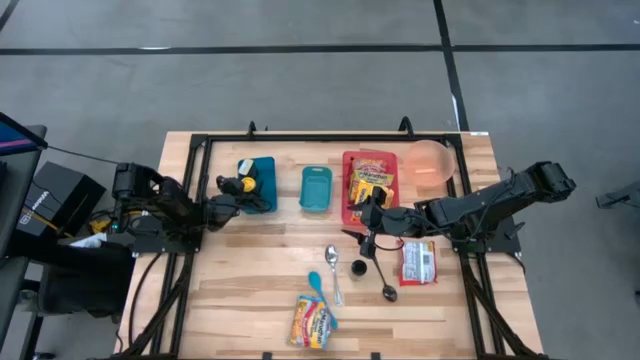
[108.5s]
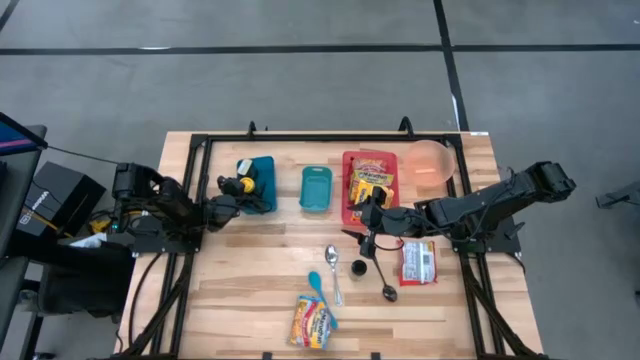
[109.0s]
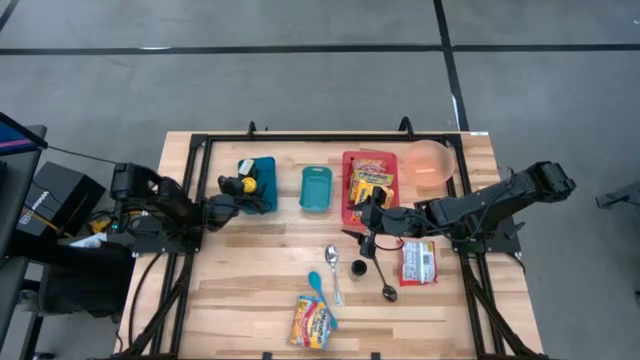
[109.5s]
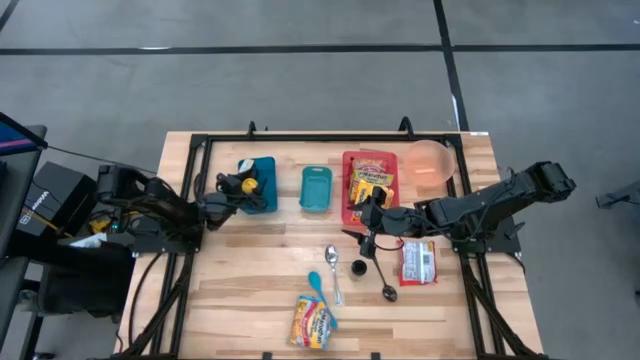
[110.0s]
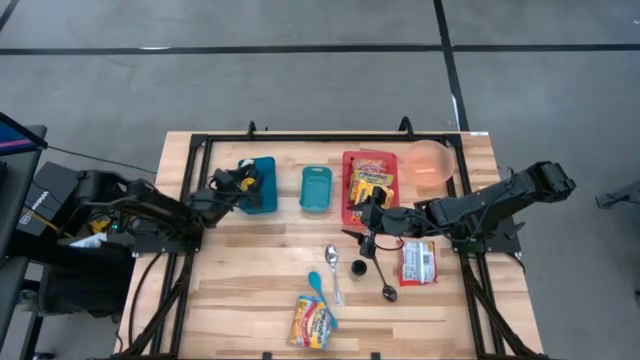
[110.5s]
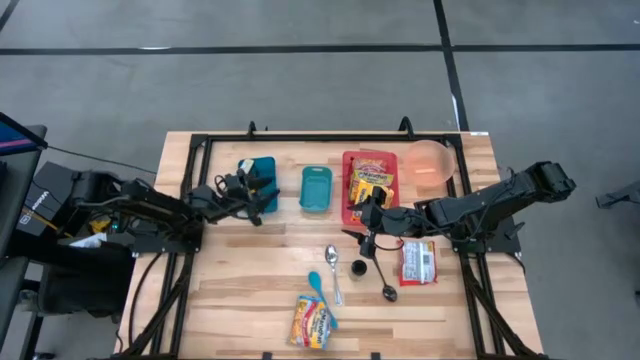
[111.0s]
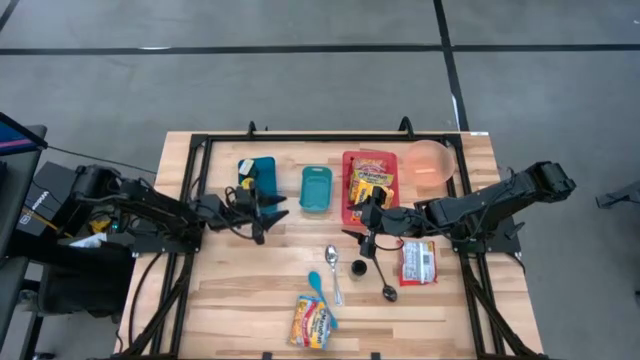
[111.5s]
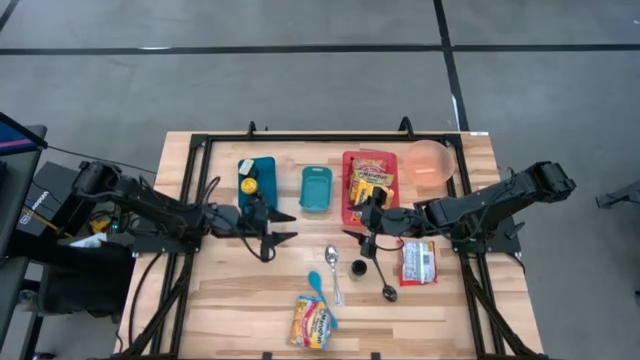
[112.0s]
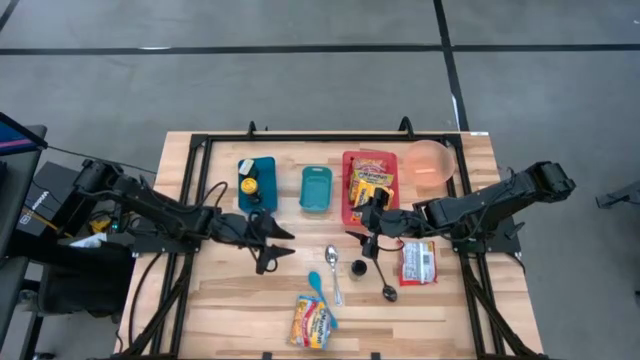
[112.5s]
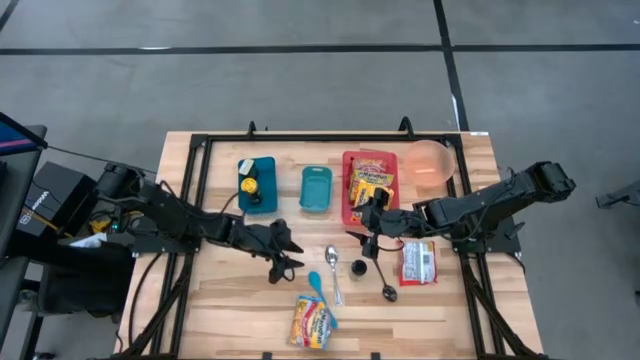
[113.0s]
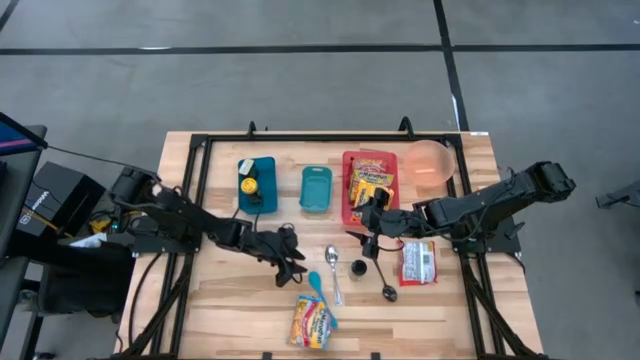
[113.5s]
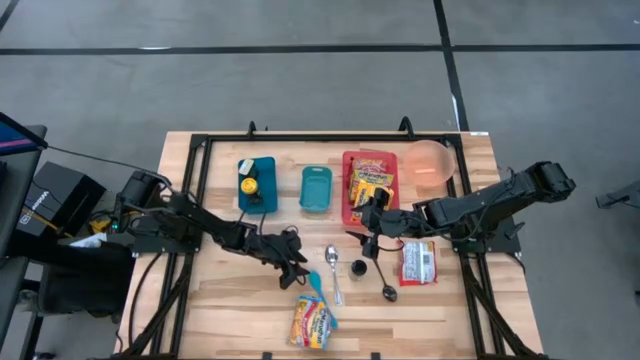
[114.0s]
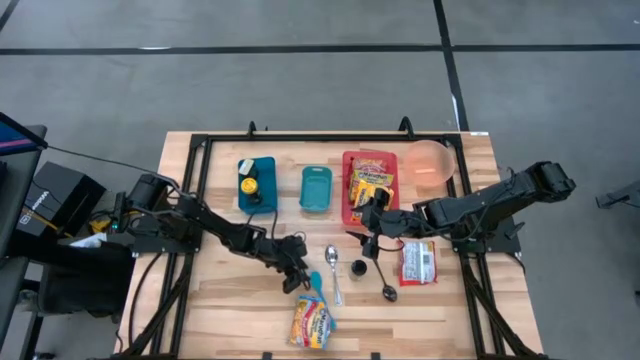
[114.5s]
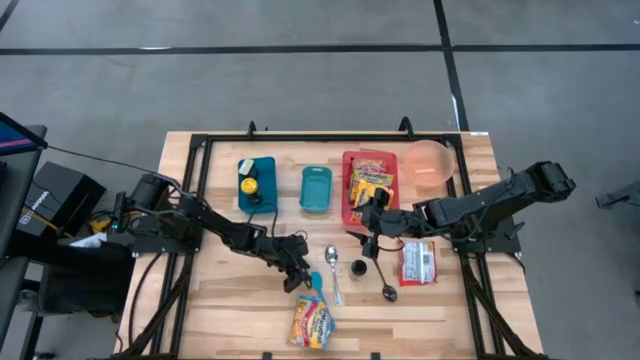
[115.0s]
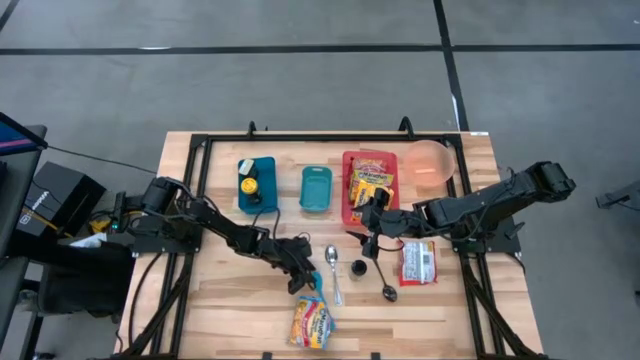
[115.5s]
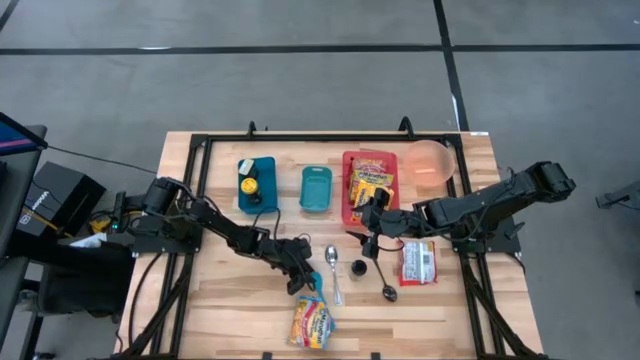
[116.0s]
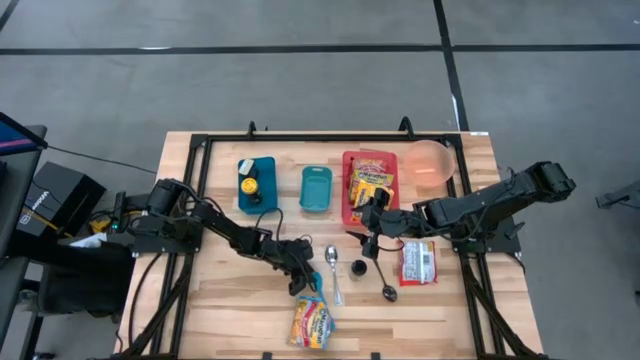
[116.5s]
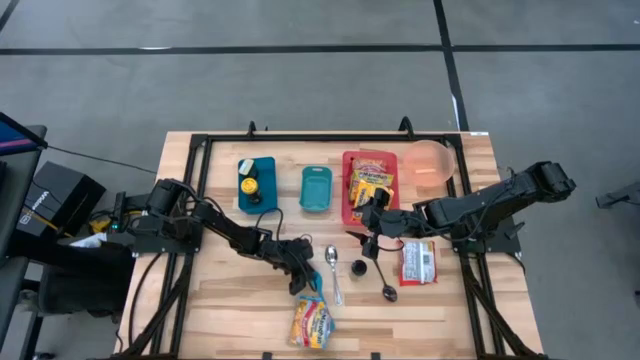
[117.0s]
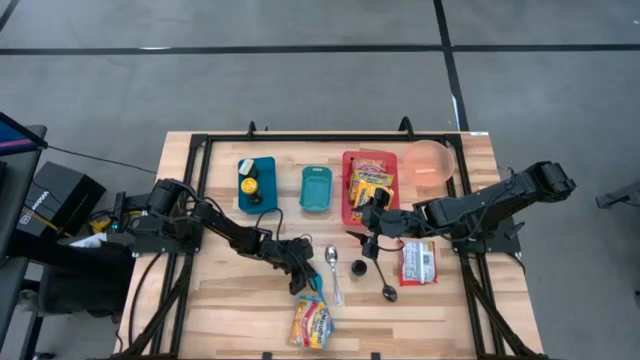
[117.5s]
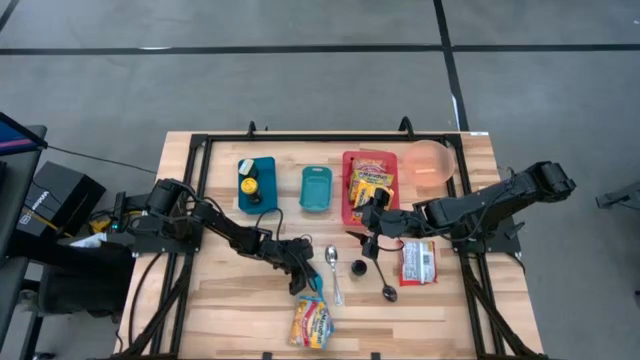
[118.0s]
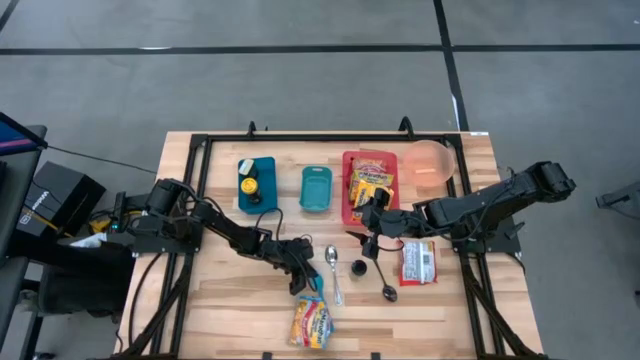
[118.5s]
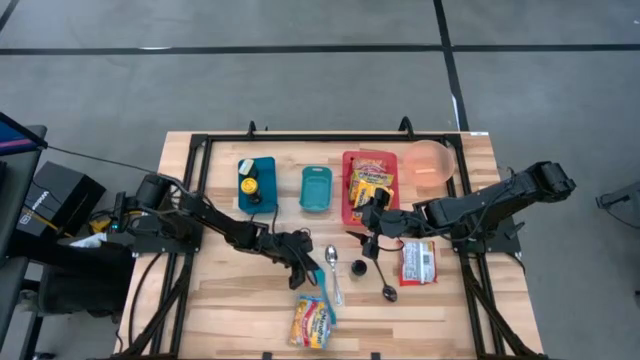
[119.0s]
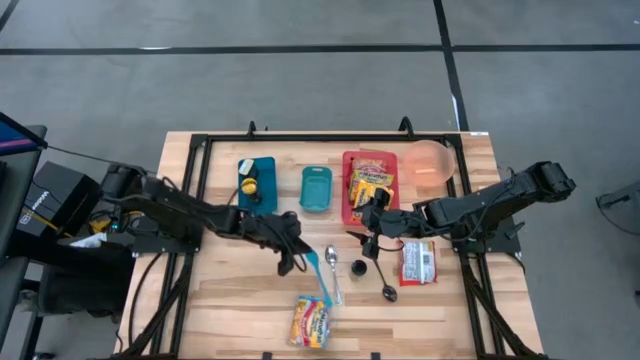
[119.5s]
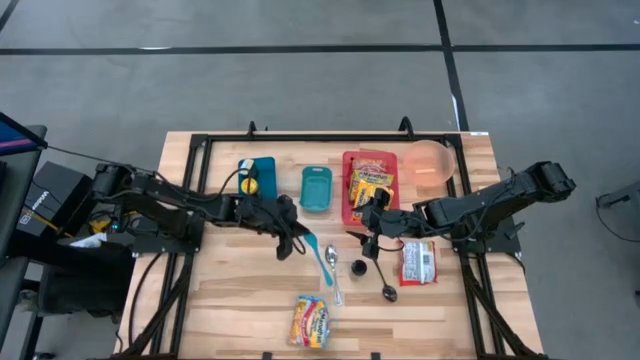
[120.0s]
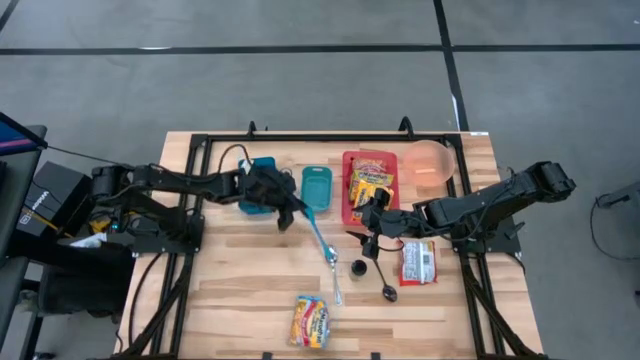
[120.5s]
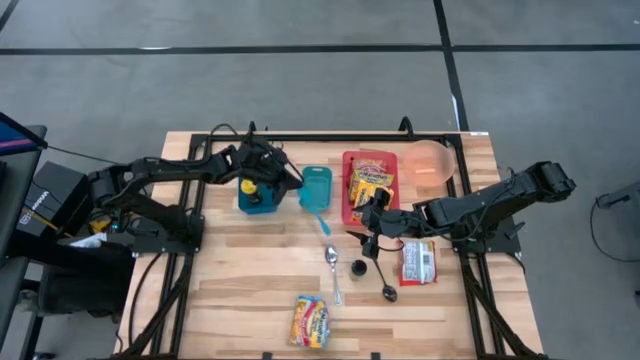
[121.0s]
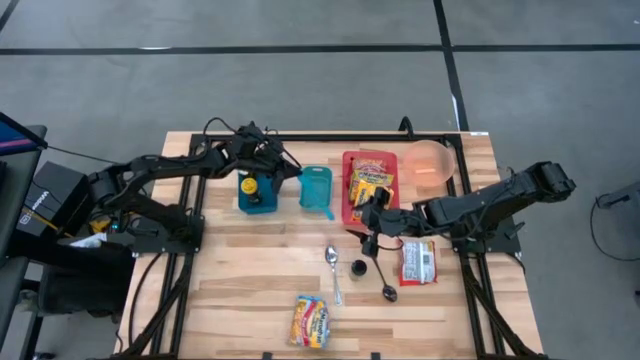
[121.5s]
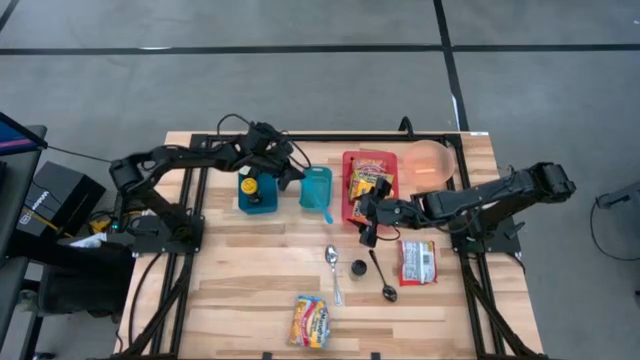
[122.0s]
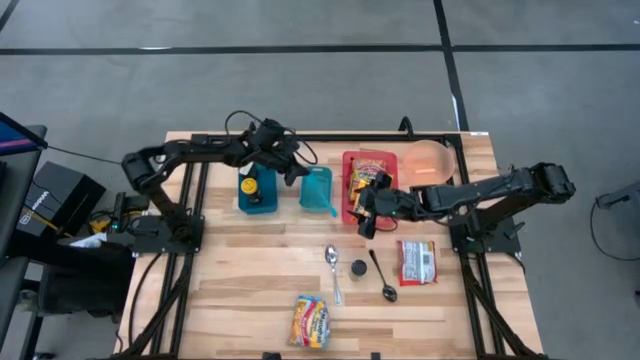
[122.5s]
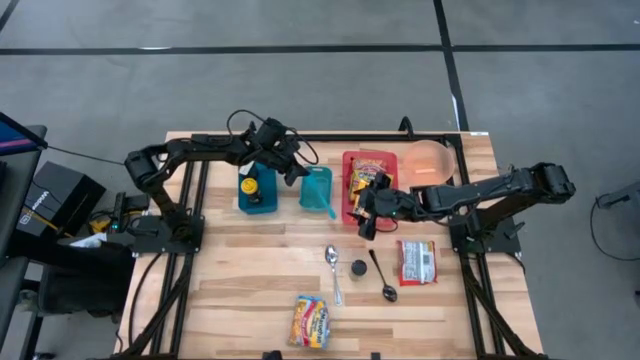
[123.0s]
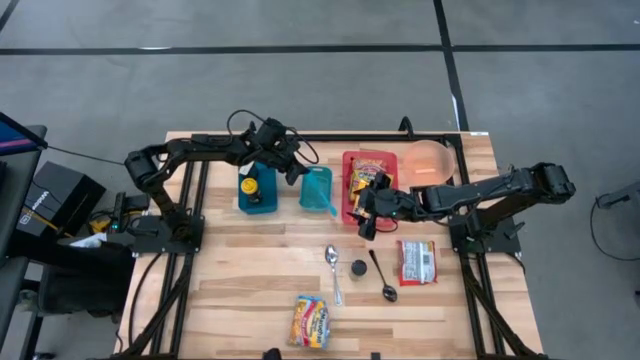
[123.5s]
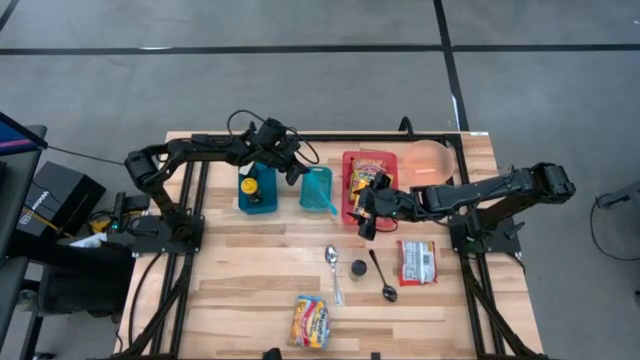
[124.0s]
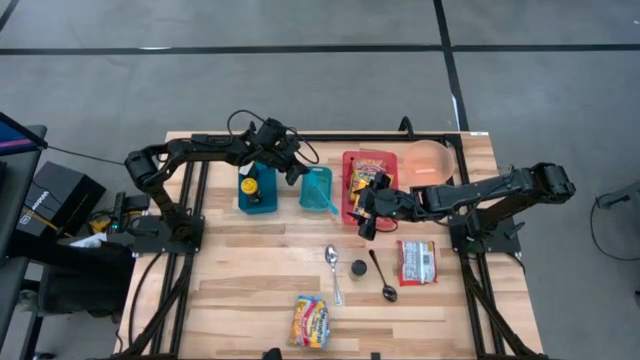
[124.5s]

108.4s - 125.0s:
Task: Pick & Place Food Item
Put the blue spoon into the green bin

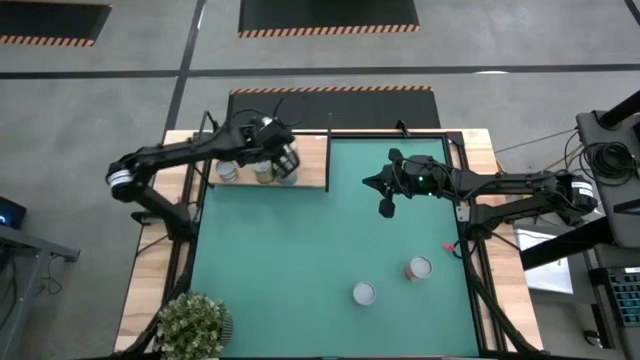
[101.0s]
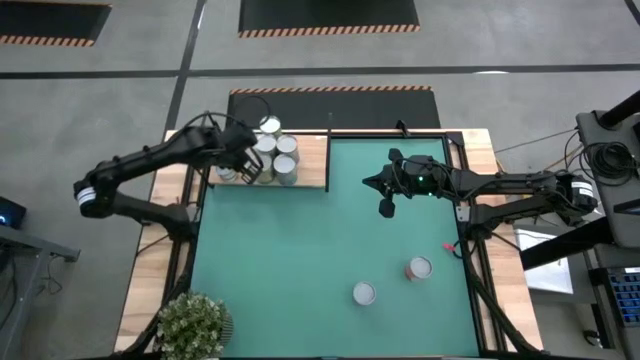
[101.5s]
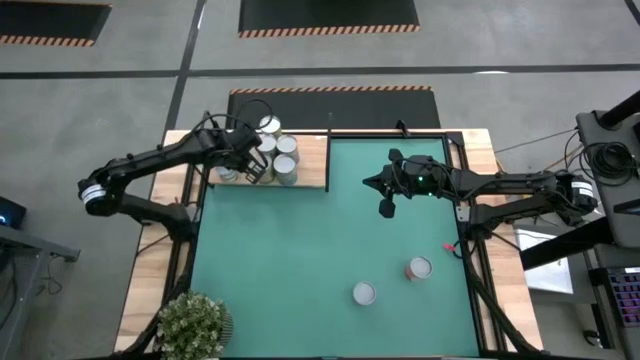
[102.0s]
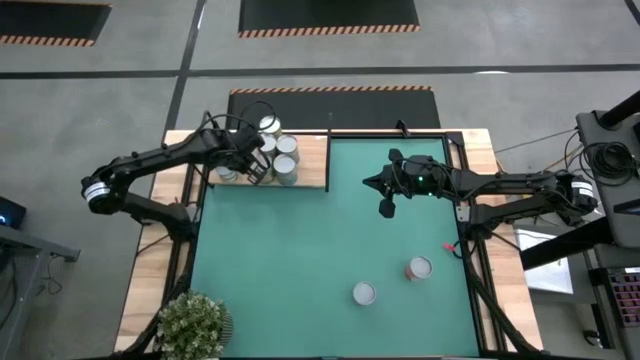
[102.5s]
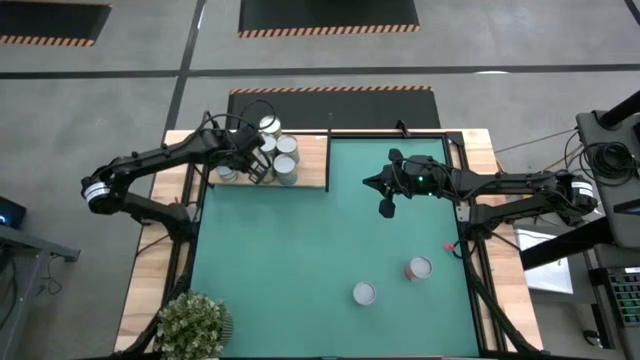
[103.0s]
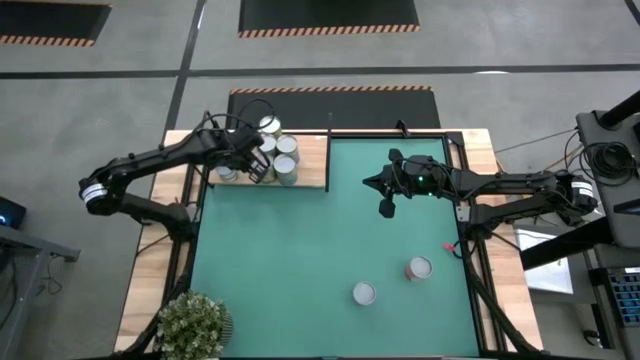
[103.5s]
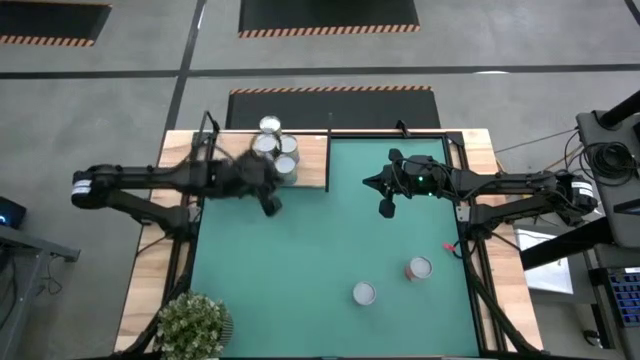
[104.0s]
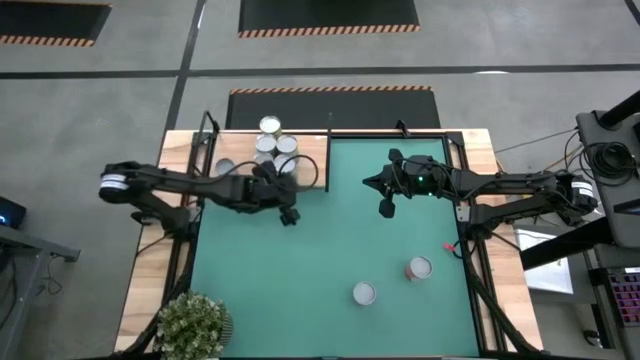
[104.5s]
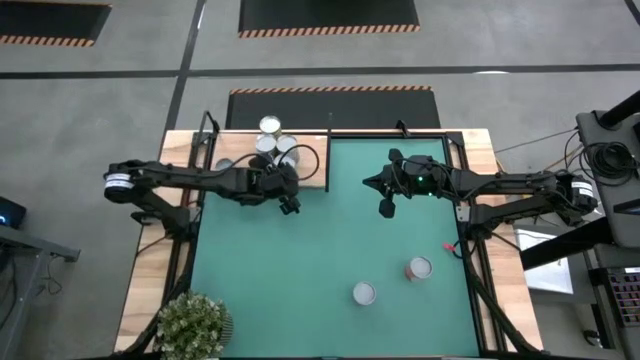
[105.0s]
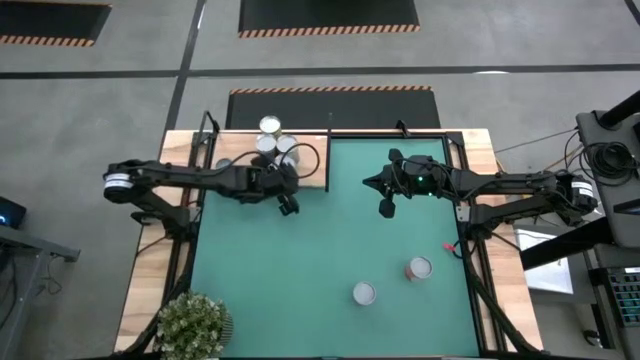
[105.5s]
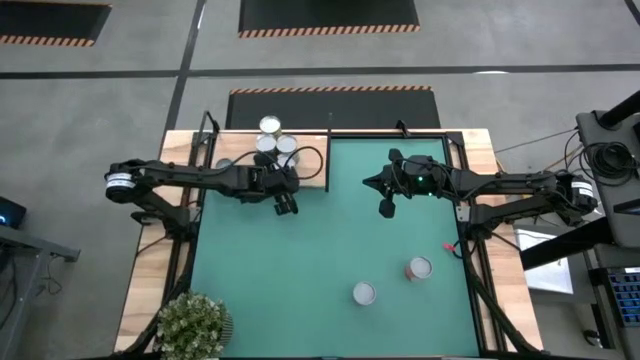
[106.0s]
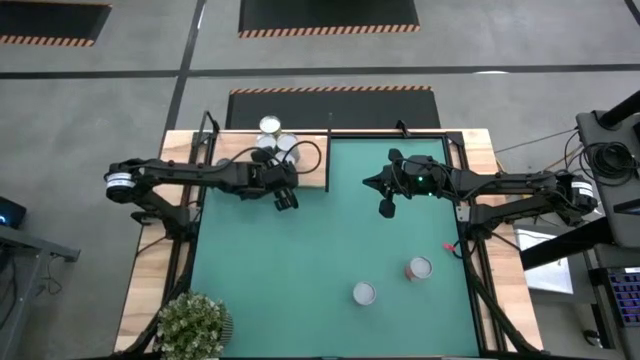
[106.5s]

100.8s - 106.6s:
Task: Pick and place cans onto a shelf
Adjust the cans on the shelf
